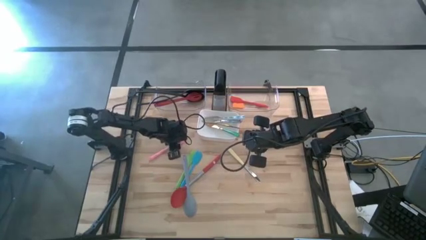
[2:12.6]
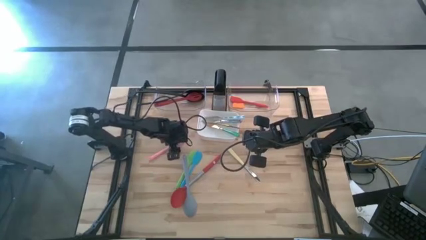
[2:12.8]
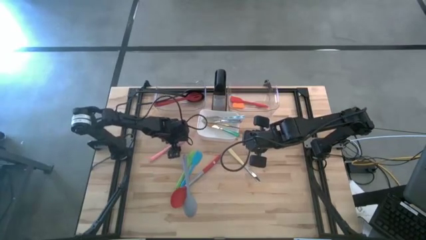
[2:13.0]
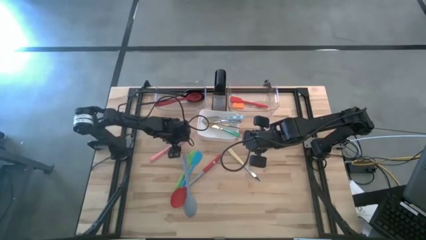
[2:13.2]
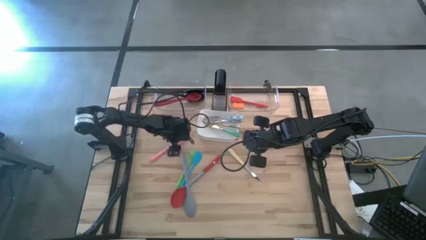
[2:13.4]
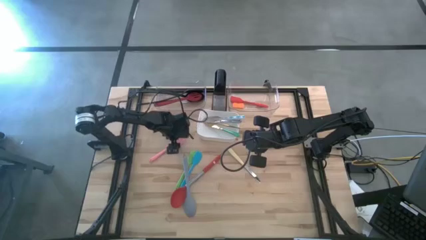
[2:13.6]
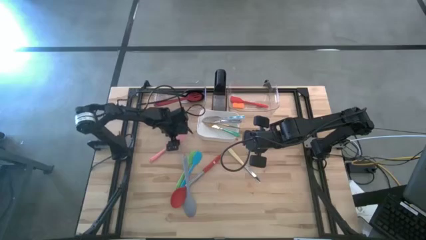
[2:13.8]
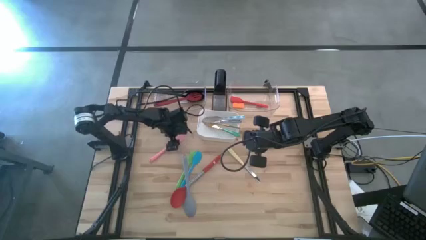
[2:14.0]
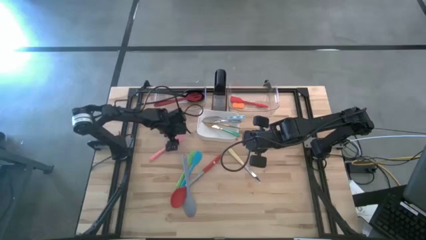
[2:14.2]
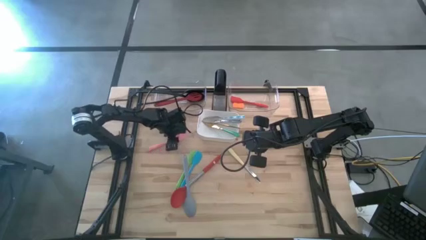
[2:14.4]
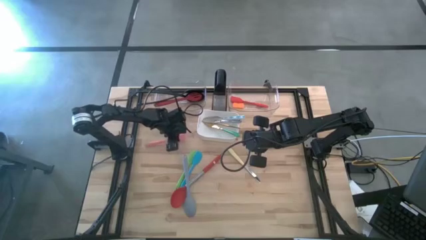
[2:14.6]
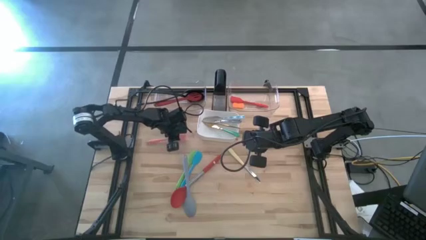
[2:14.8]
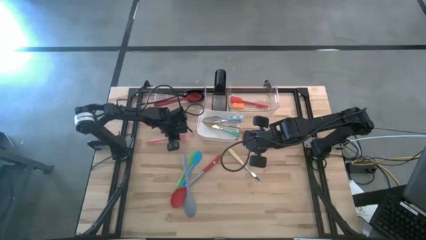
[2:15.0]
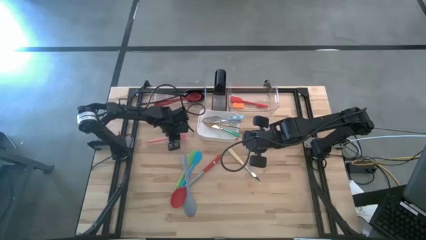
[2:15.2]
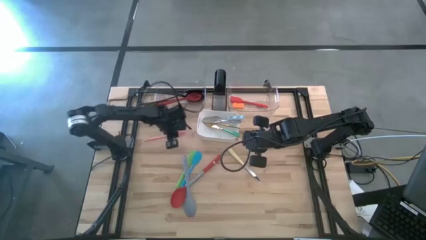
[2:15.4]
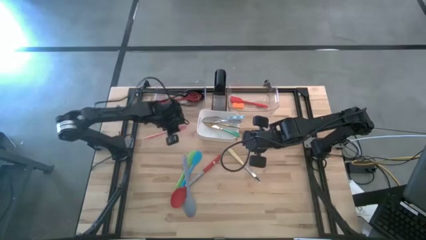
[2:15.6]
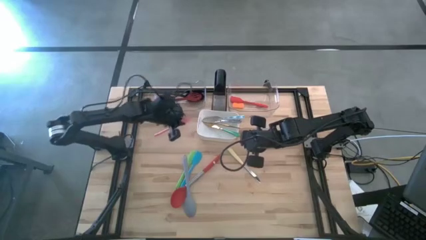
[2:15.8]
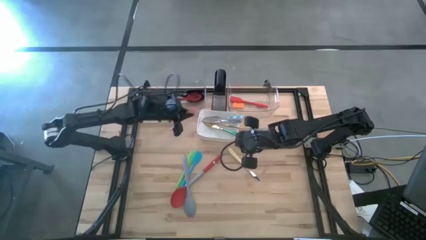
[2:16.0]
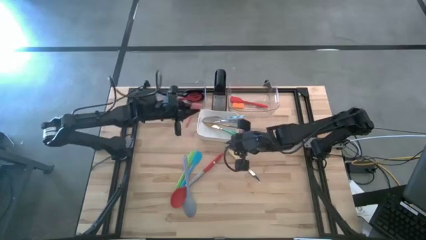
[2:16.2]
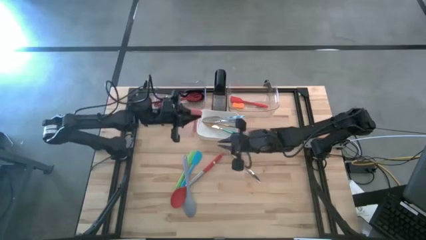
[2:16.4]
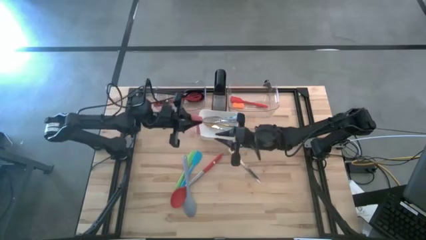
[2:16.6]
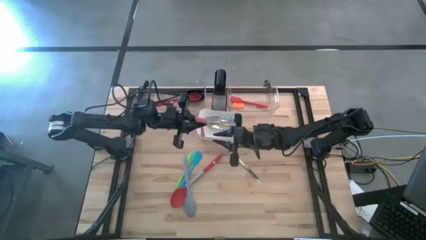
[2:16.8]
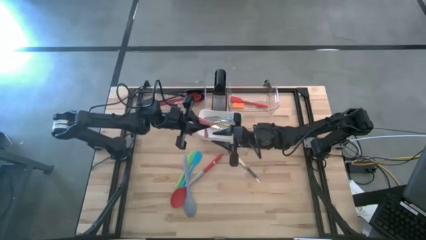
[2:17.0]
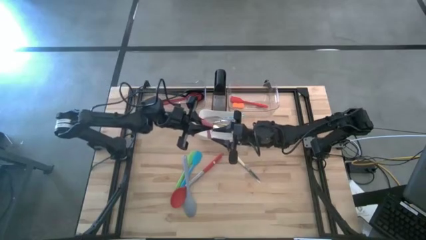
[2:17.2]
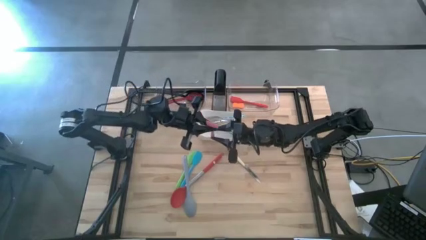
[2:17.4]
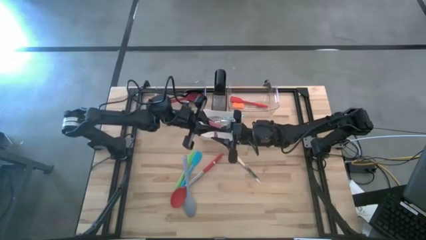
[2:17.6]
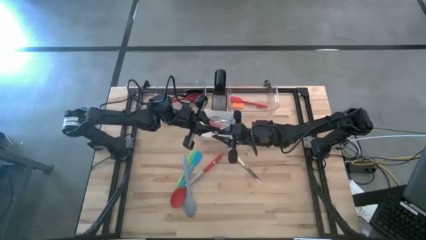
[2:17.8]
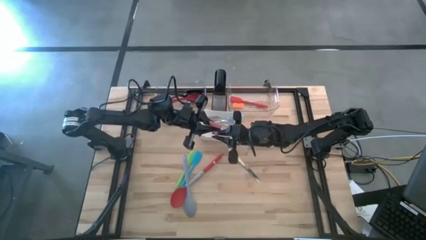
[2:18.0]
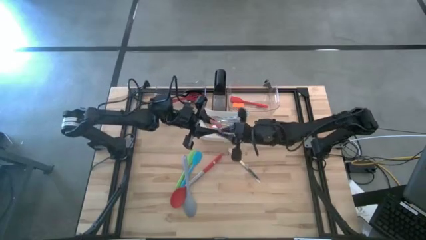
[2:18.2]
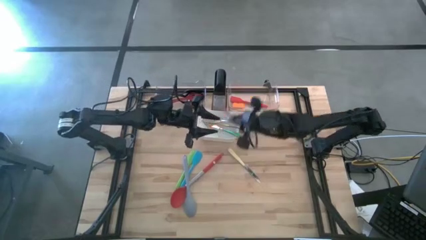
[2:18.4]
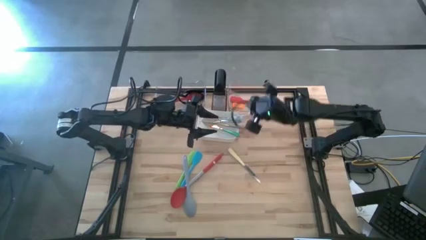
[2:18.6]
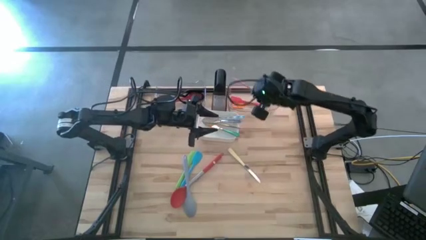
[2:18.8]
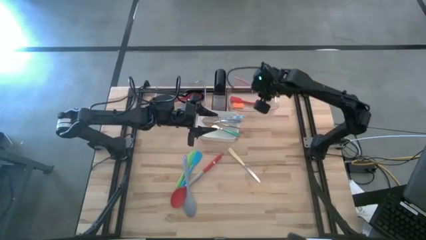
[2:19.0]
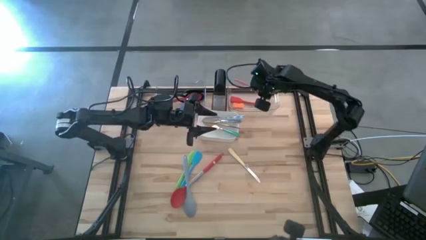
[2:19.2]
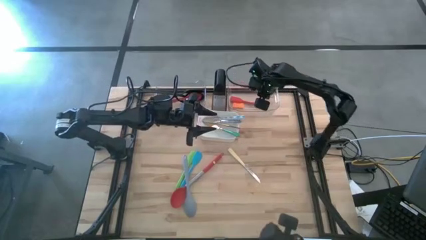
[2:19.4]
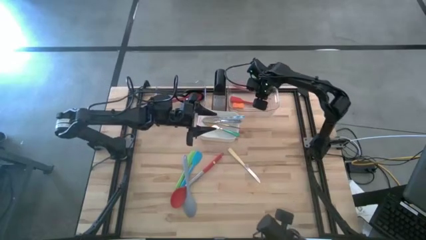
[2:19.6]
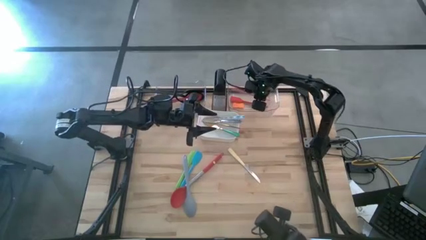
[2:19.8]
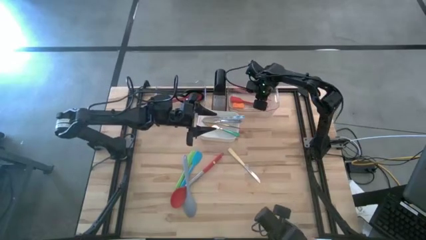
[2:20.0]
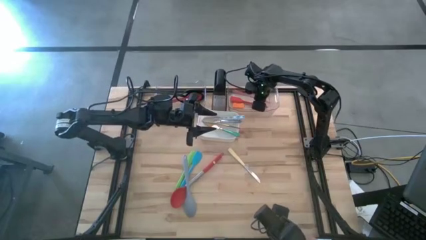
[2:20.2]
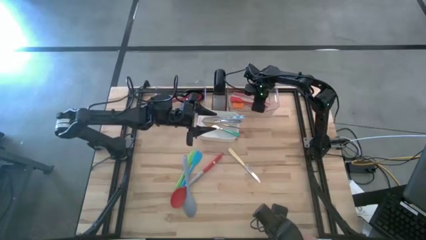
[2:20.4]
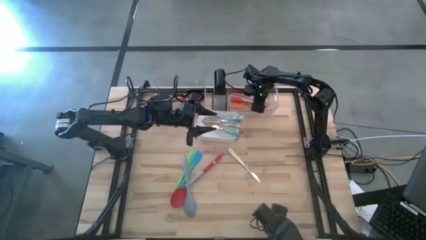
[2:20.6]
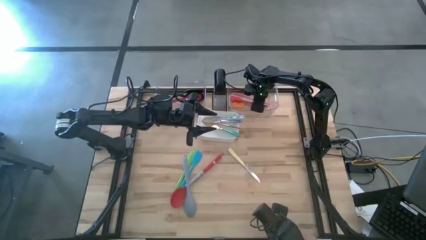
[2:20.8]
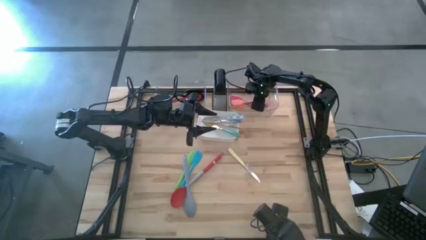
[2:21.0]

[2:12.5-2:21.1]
Task: Pick & Place Kitchen Items
Put the pink spatula into the right transparent bin

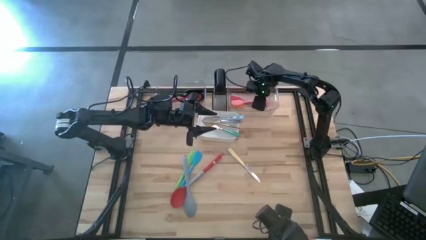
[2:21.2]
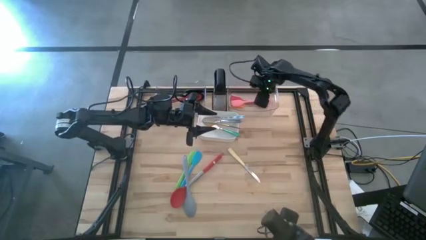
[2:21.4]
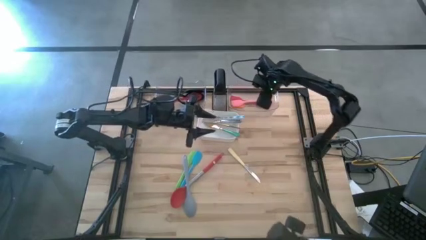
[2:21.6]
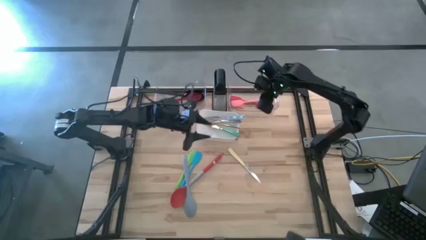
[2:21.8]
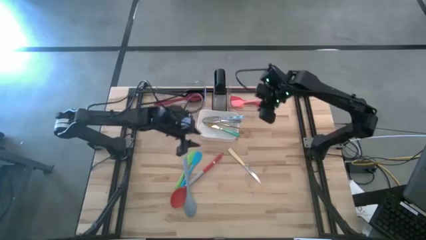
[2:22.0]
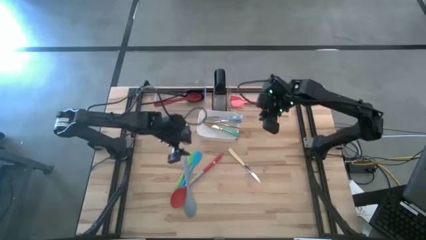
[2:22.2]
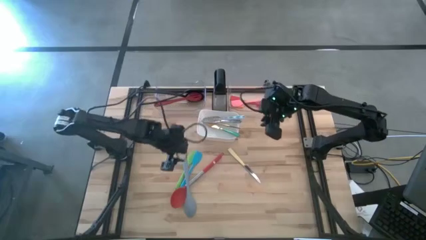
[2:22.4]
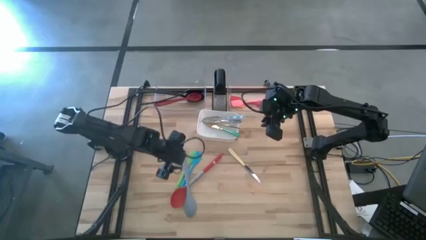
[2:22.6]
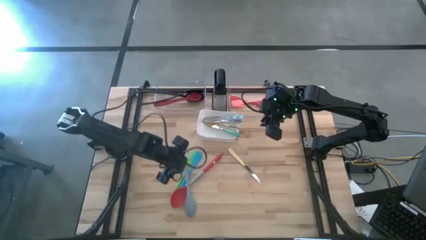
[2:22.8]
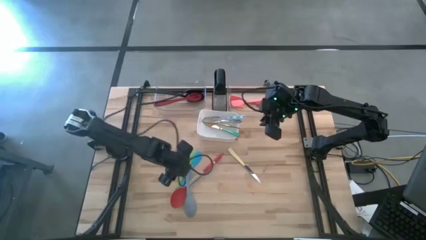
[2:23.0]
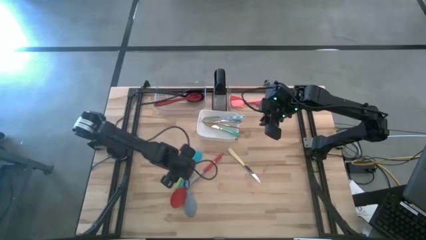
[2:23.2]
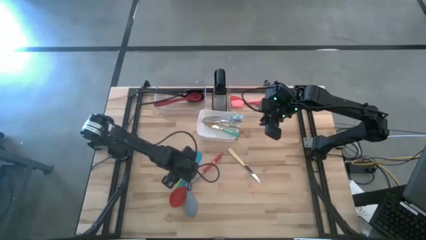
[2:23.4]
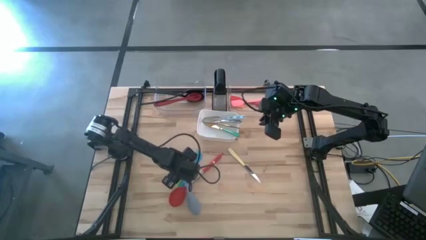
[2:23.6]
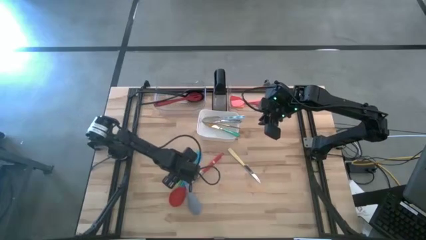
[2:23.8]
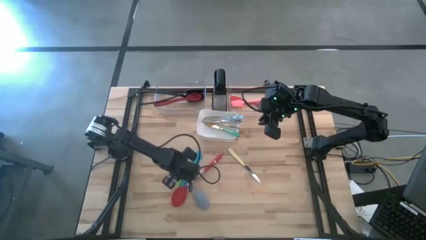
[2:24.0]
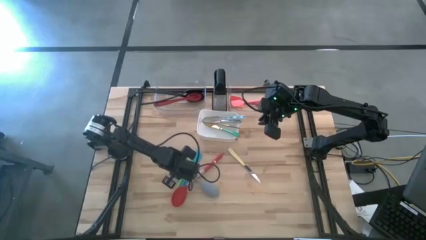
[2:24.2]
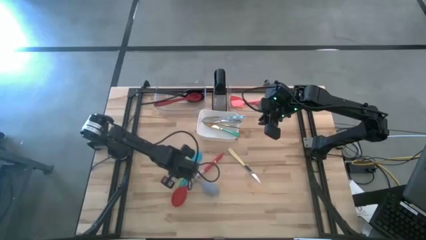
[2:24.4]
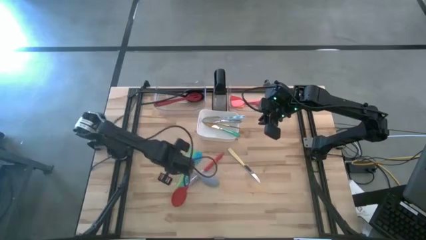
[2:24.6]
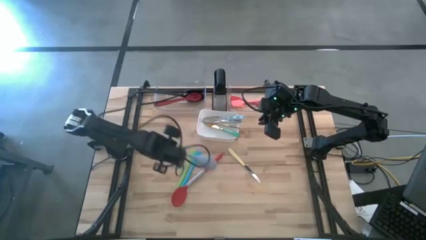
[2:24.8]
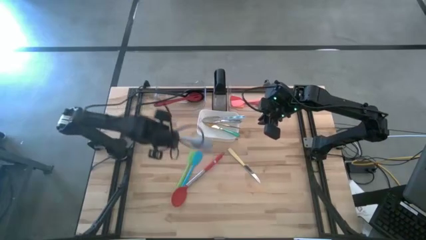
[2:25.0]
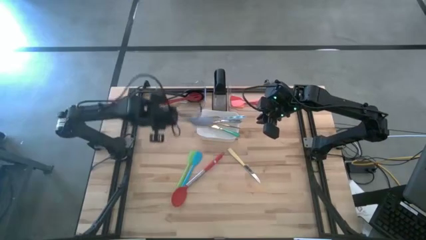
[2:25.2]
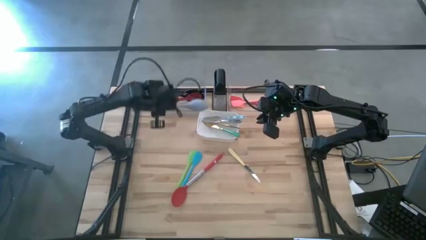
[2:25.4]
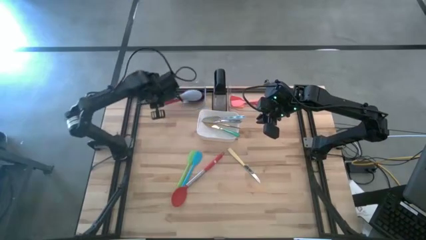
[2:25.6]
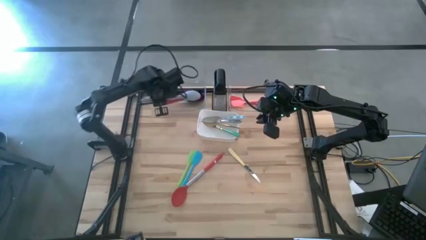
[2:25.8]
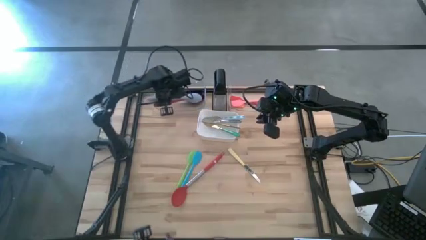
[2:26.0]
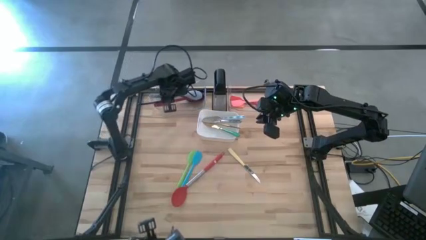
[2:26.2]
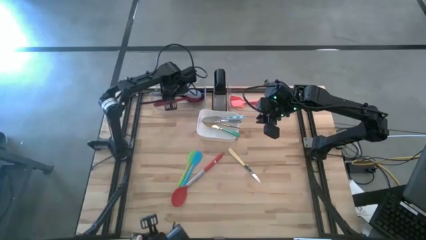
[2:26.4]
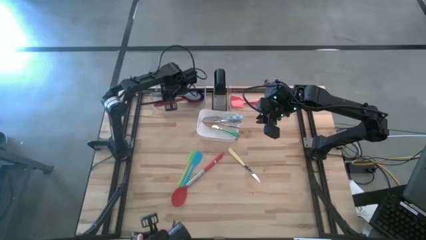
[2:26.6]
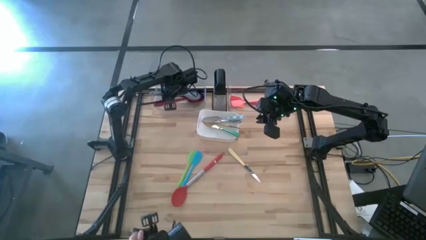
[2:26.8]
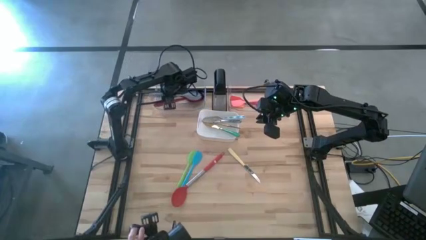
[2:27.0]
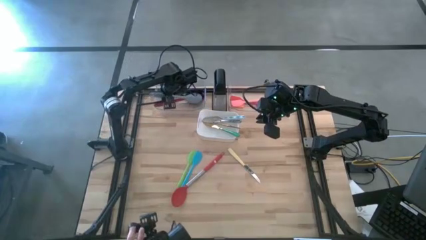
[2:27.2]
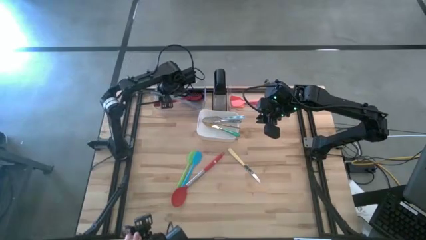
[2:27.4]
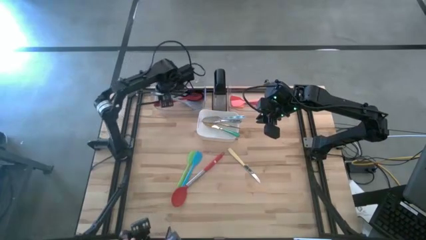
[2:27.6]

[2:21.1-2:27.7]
Put the gray serving spoon into the left transparent bin
